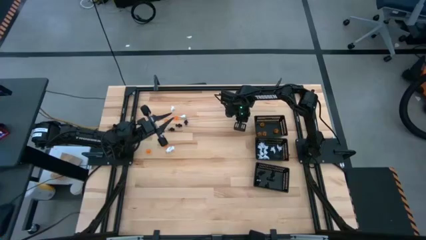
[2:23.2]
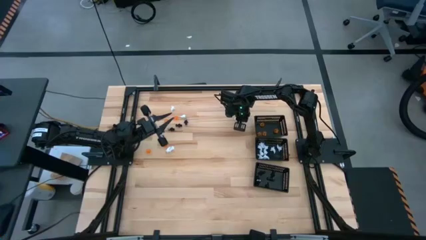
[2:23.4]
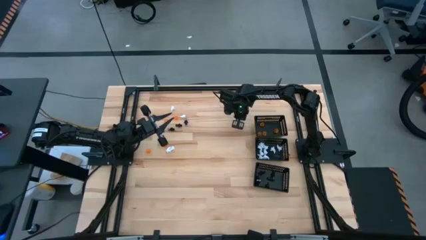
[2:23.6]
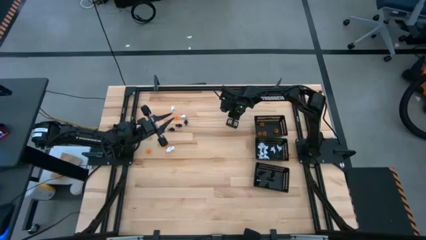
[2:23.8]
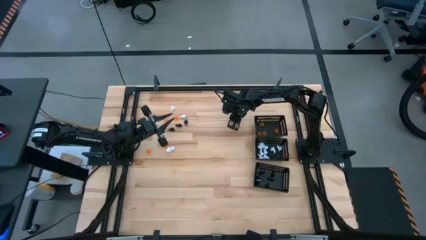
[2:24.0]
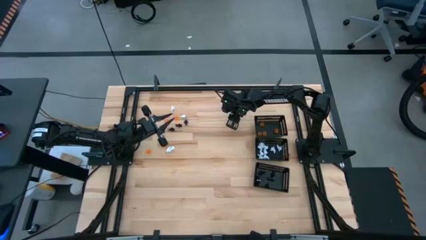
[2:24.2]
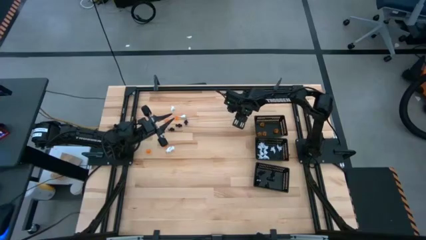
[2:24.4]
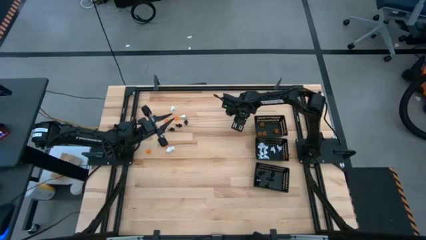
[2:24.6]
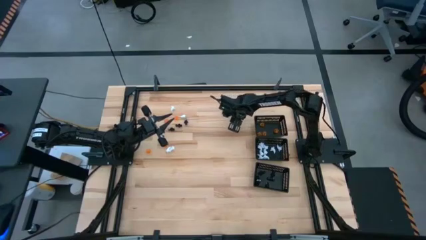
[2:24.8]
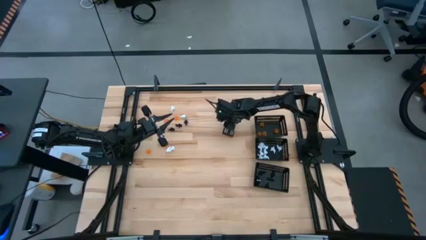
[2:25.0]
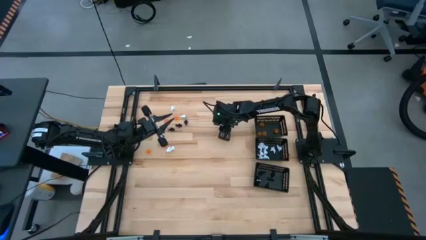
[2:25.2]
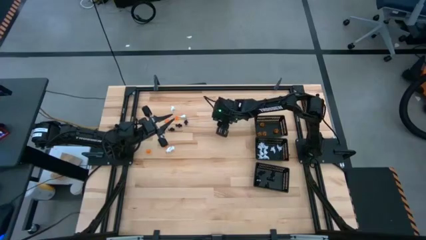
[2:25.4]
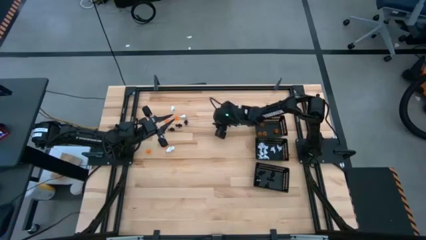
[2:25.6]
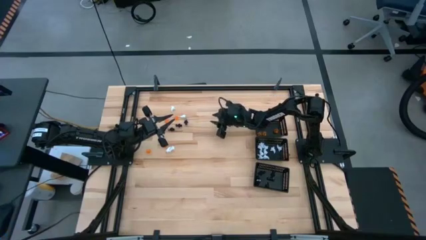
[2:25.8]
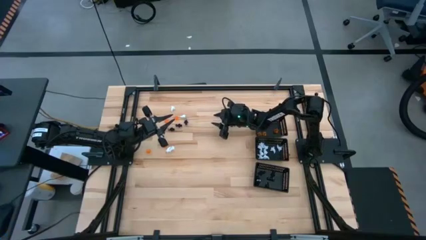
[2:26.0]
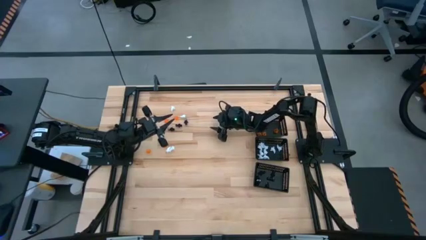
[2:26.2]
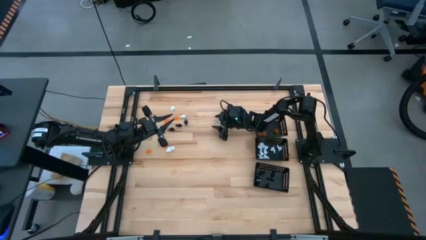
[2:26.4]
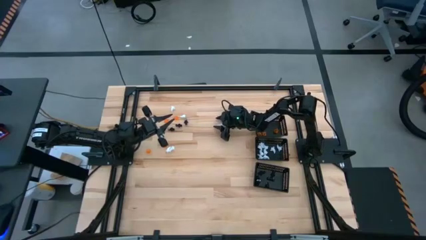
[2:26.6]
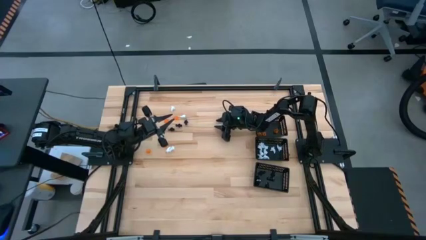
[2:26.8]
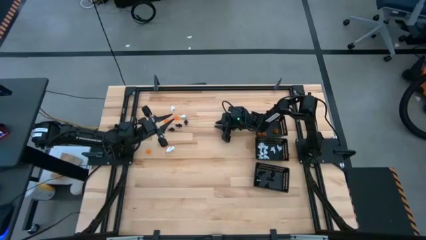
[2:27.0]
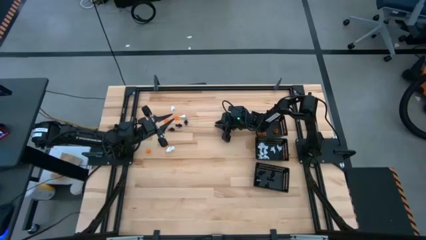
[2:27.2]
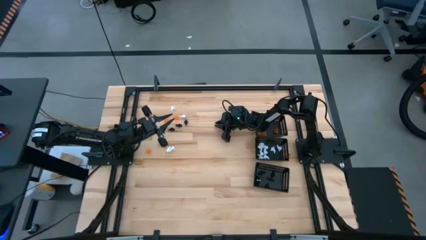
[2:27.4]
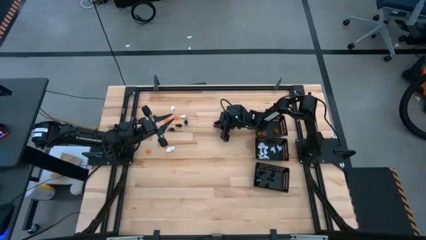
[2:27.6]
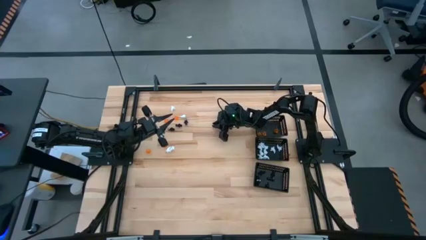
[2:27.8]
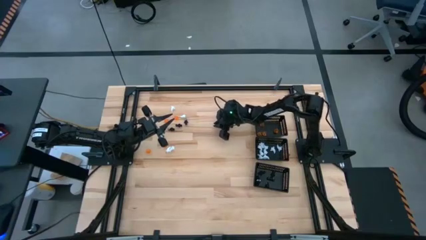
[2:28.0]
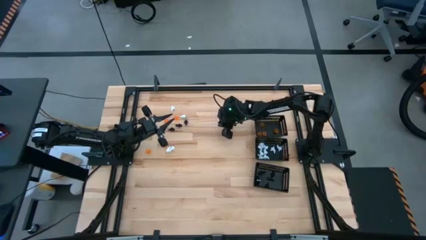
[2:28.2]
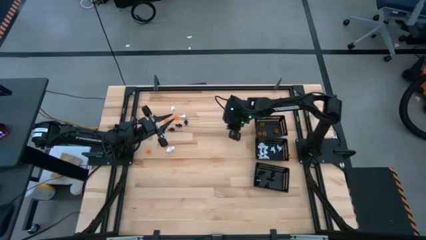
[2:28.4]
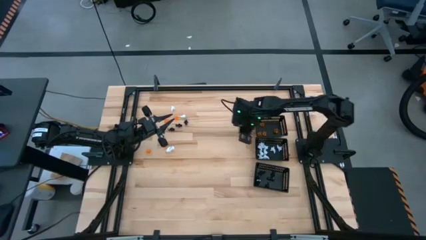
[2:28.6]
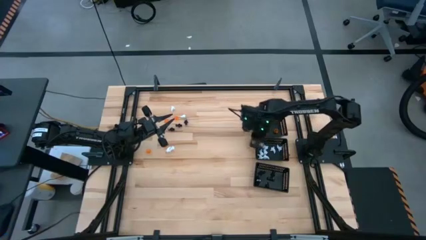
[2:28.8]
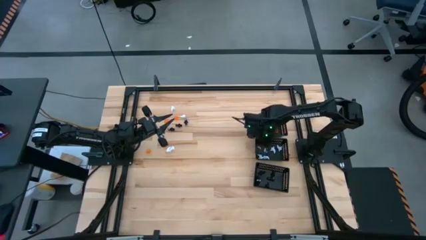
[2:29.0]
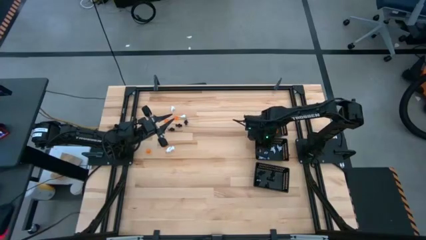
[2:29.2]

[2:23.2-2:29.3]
Task: Sort Halloween decoration
Put the white ghost toy into the center black bin

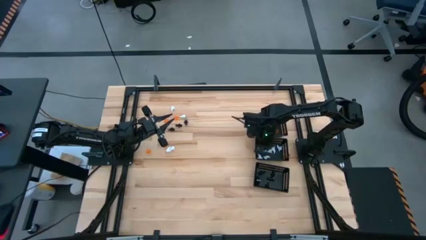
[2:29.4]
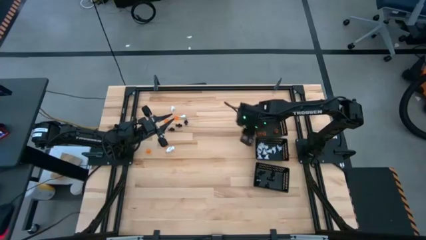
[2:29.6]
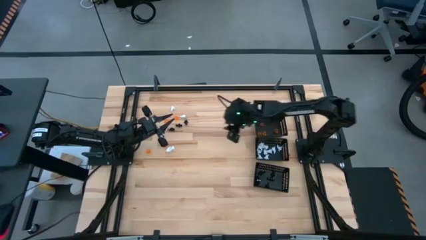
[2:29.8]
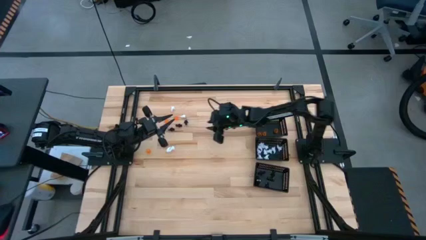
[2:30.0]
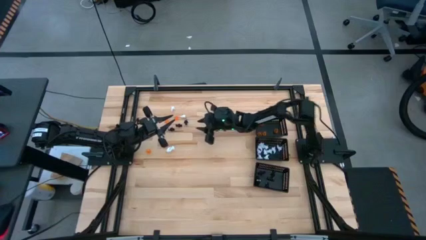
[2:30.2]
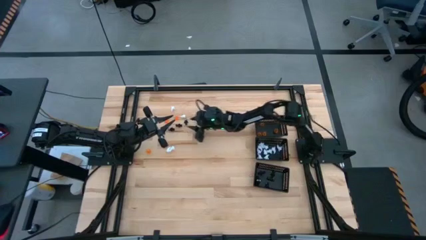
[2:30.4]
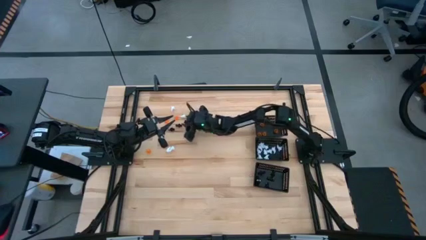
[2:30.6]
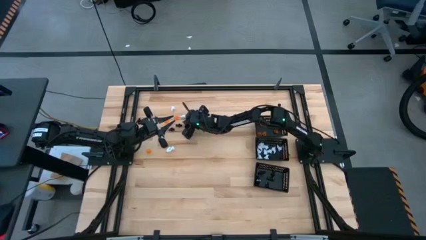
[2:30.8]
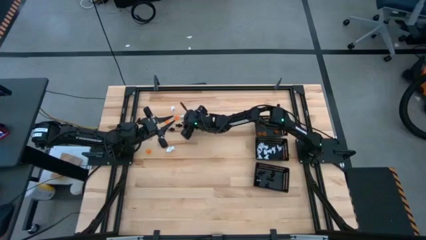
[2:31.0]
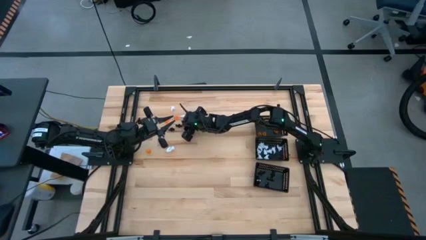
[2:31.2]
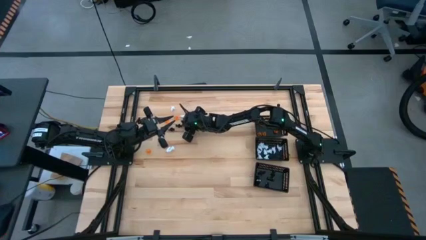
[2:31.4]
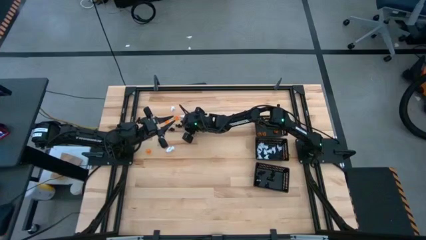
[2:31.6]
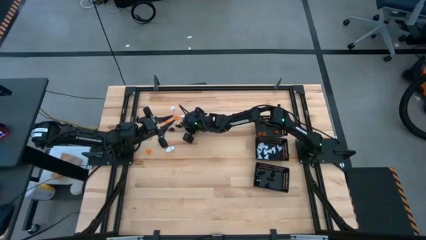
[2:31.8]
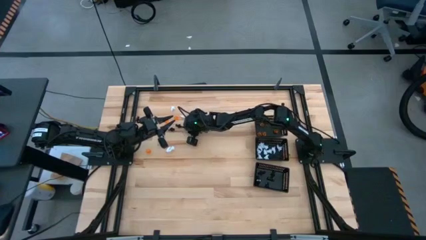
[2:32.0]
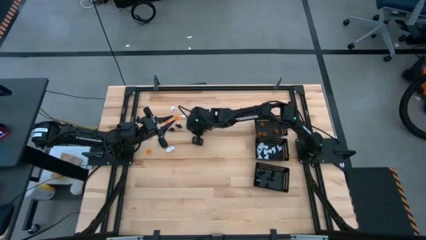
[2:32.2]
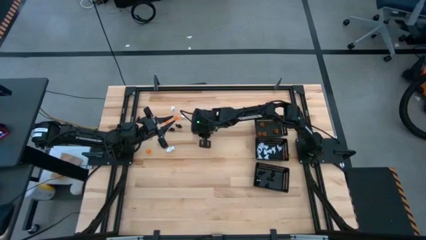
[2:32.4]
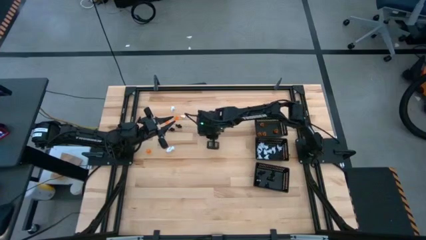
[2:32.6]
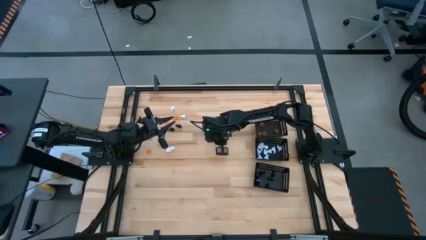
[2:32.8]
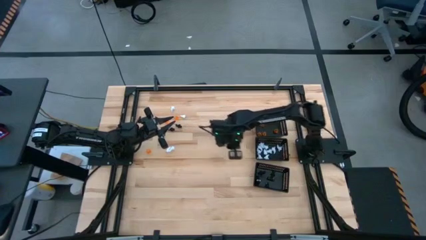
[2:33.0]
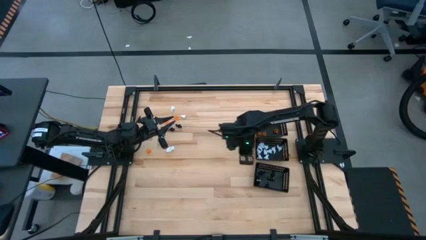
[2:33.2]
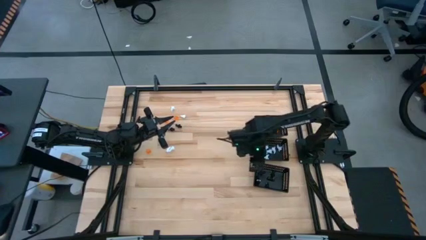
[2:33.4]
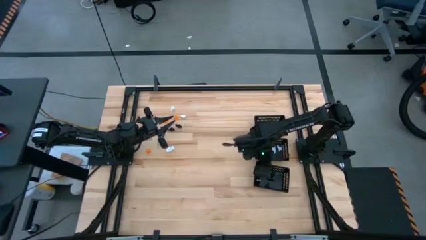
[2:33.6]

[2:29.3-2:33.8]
Put the black skeleton toy into the bottom black bin

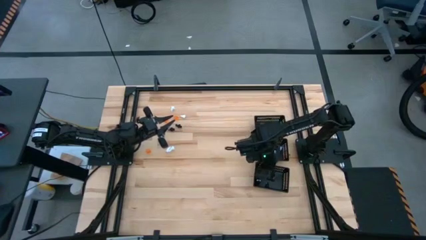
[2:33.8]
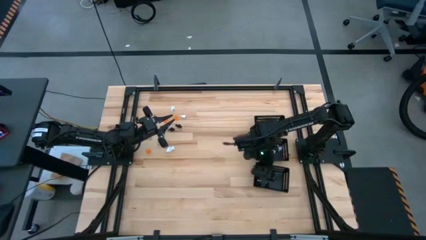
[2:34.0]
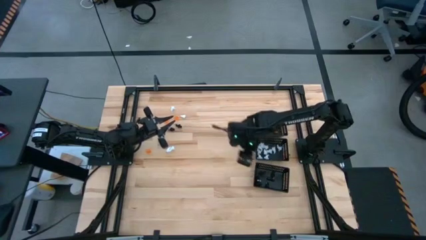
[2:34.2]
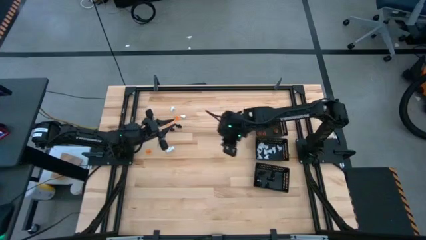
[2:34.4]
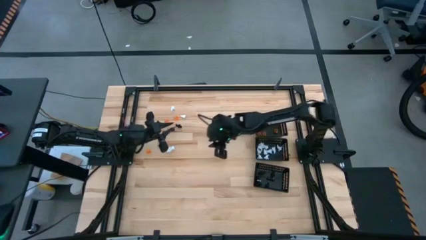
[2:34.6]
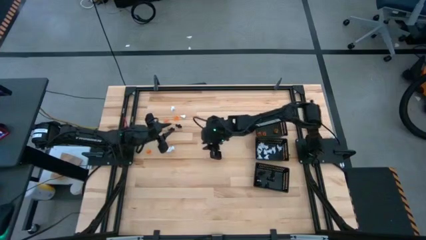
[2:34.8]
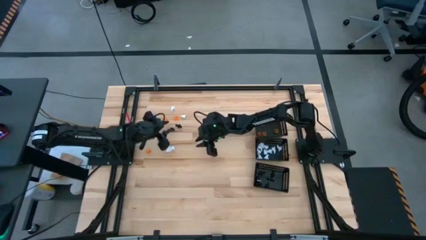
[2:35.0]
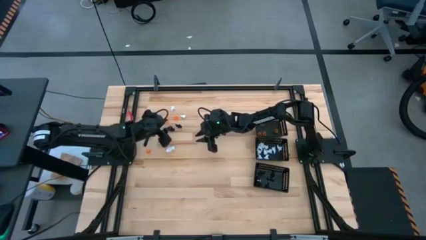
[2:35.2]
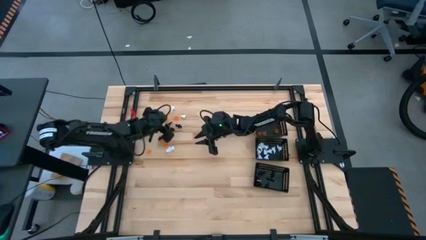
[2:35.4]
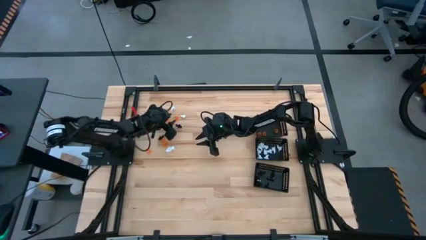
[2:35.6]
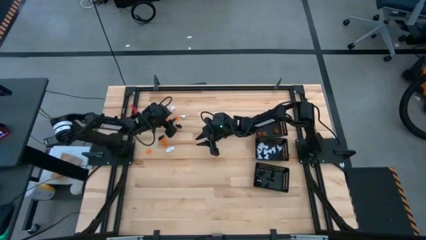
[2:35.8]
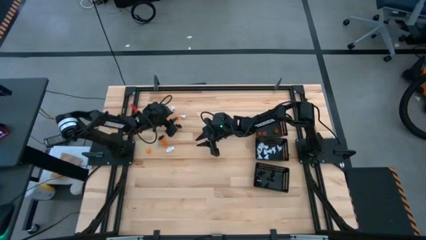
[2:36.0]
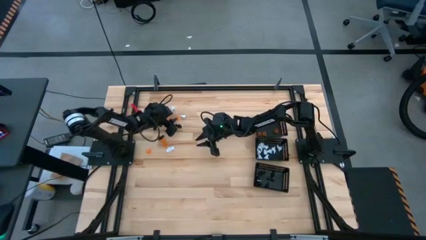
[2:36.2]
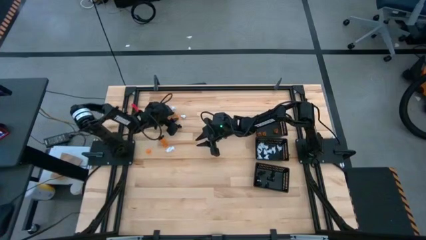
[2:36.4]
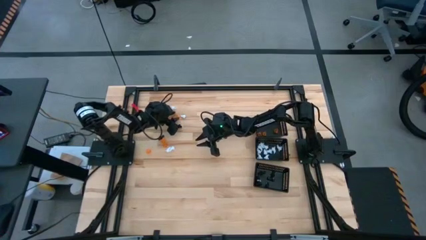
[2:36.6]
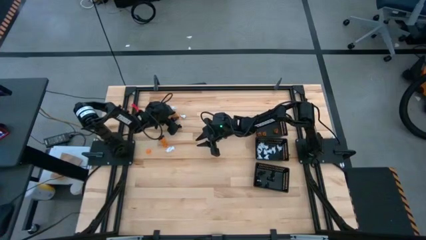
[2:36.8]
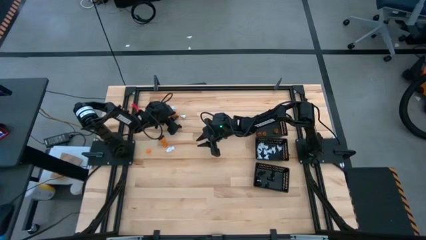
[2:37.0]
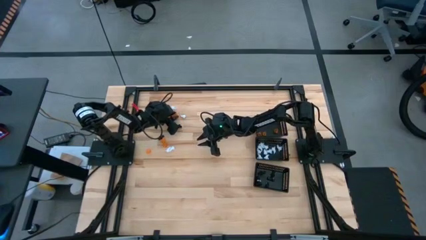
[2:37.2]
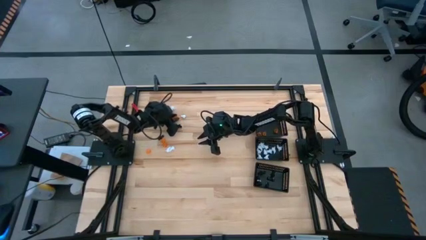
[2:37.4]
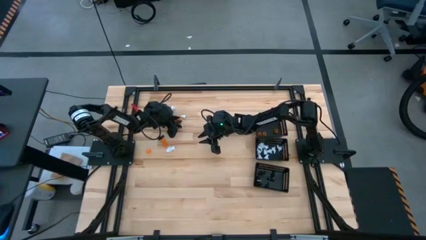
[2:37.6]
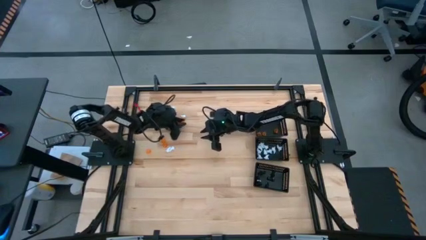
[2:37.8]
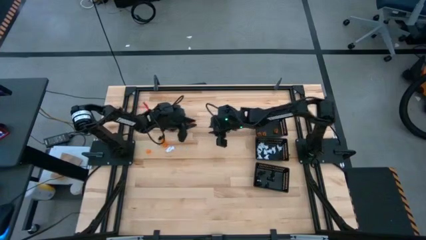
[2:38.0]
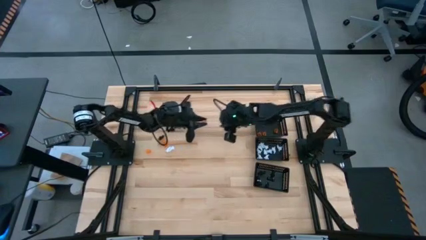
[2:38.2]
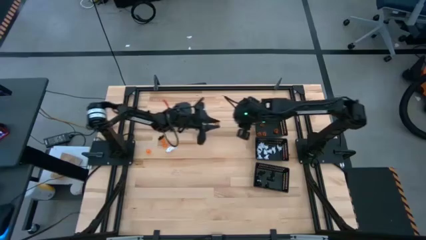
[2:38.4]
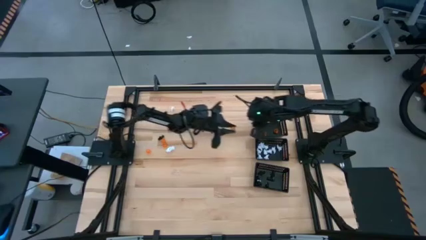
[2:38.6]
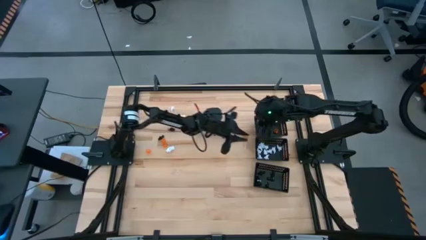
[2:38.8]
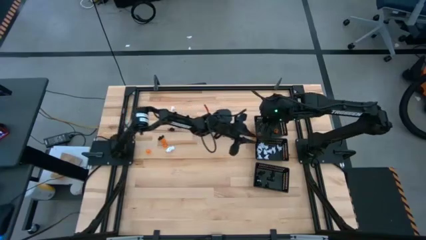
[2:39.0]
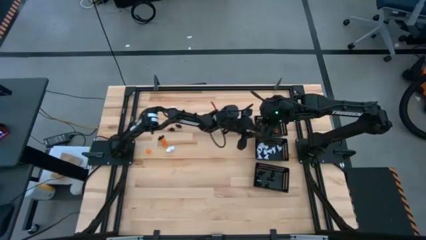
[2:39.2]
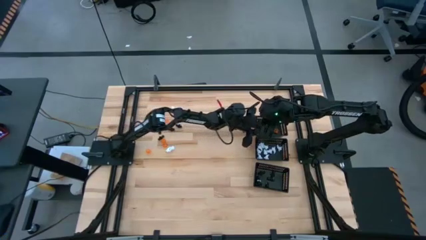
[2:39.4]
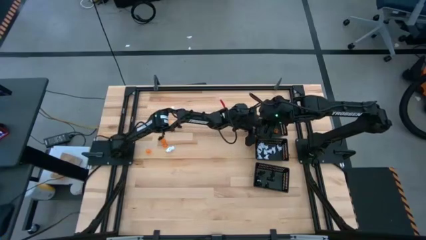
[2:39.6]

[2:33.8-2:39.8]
Put the orange pumpkin toy into the top black bin
